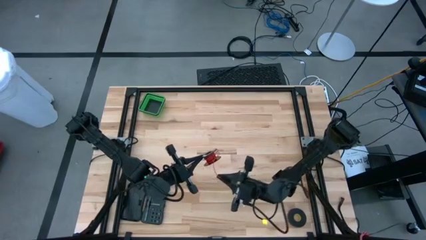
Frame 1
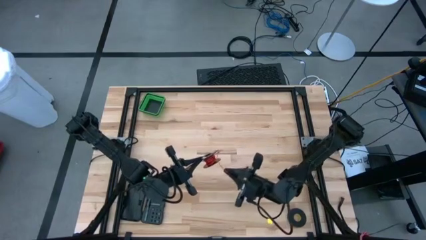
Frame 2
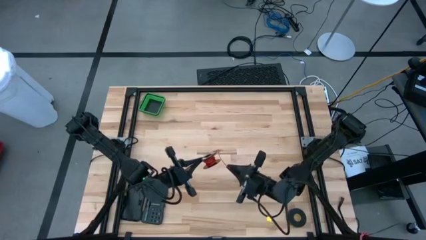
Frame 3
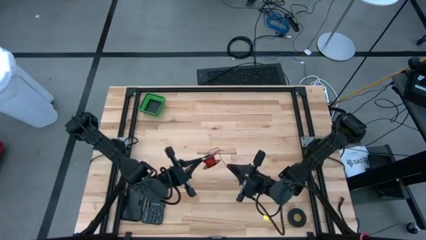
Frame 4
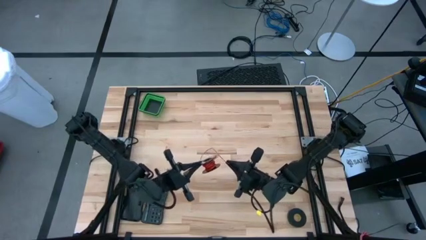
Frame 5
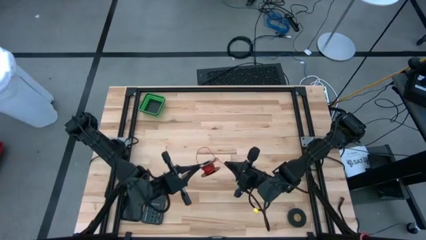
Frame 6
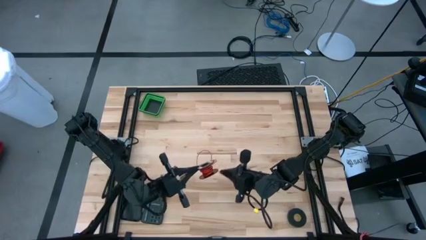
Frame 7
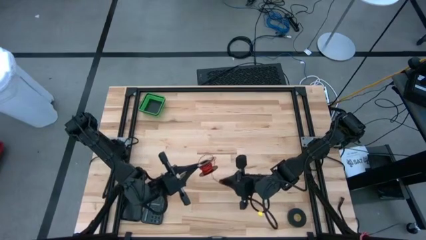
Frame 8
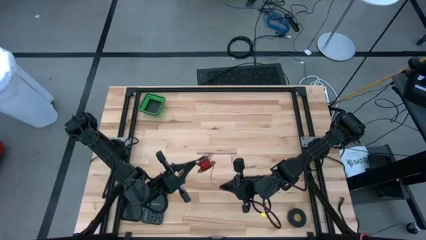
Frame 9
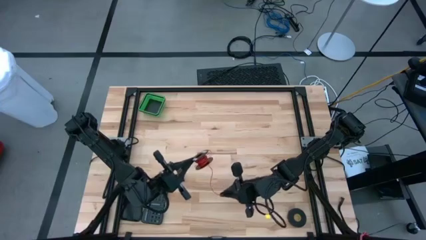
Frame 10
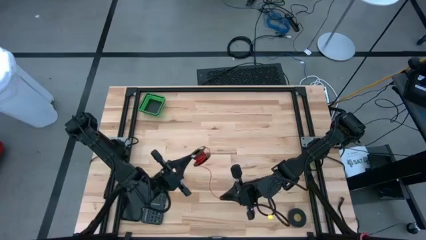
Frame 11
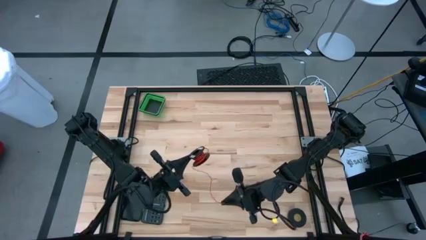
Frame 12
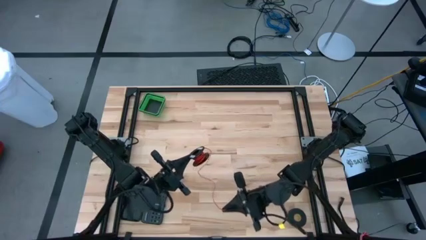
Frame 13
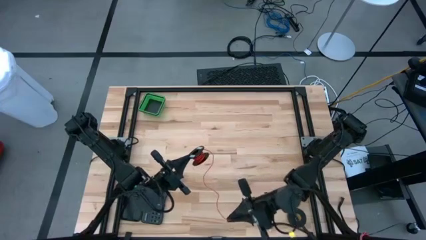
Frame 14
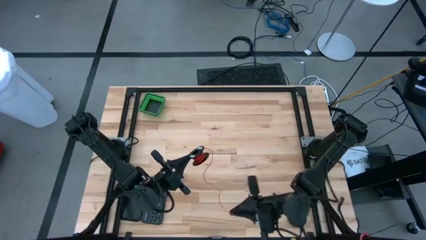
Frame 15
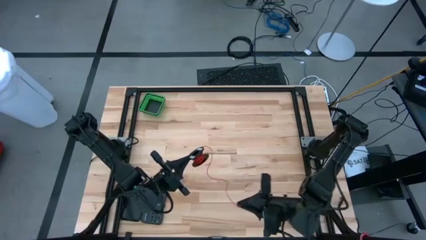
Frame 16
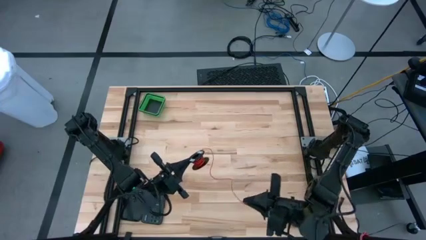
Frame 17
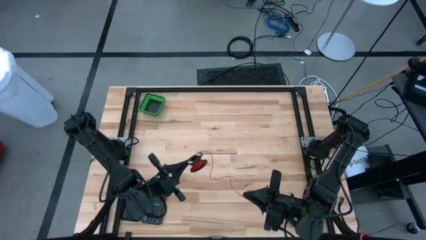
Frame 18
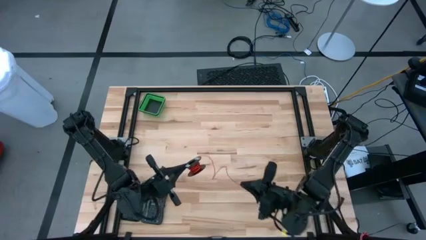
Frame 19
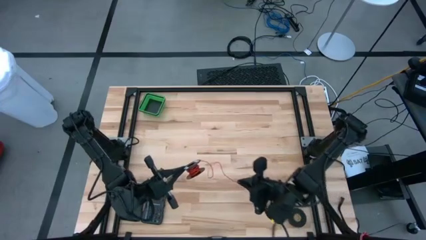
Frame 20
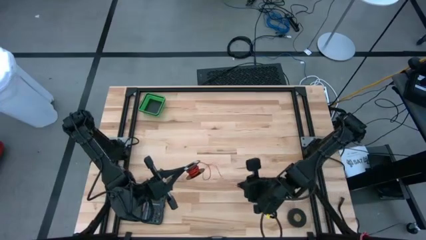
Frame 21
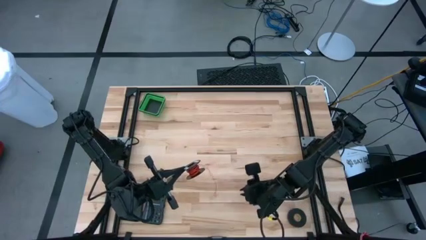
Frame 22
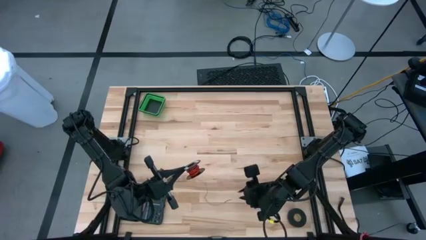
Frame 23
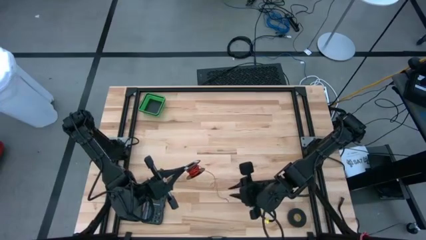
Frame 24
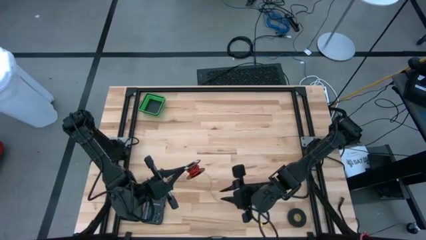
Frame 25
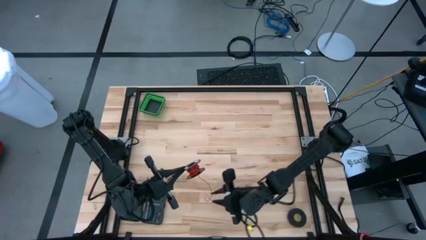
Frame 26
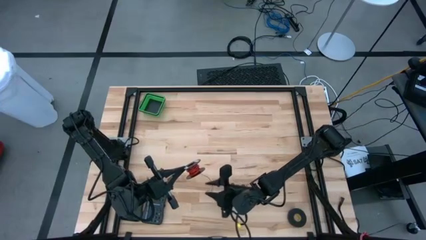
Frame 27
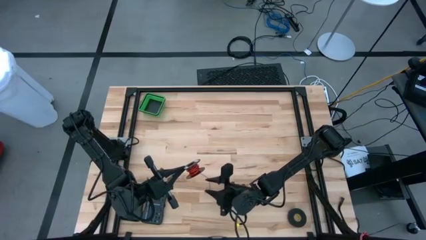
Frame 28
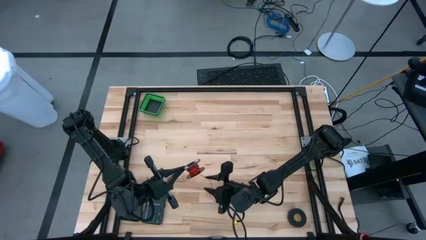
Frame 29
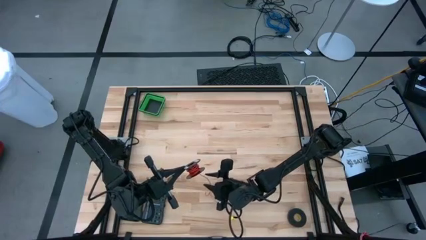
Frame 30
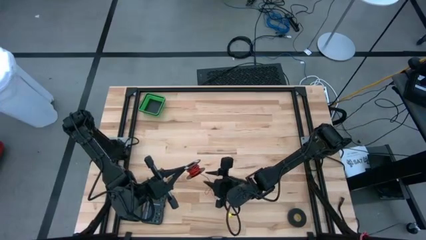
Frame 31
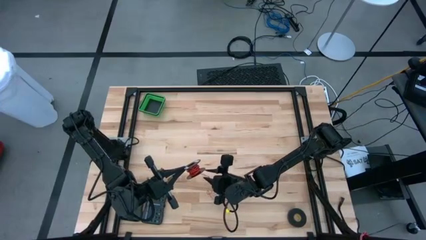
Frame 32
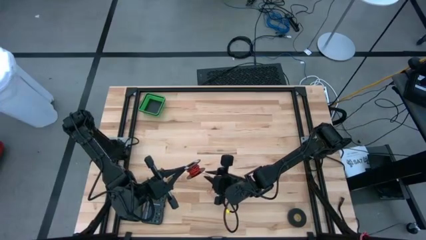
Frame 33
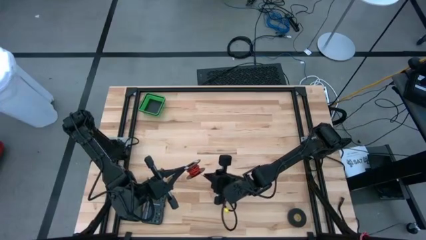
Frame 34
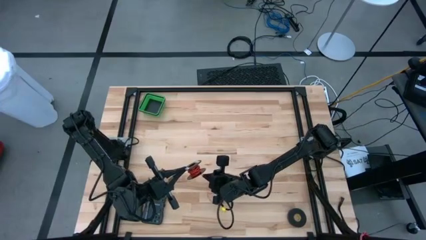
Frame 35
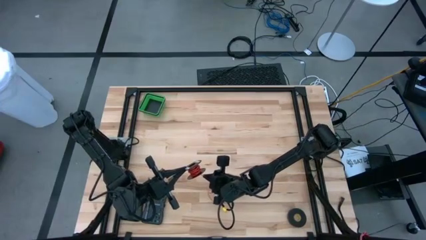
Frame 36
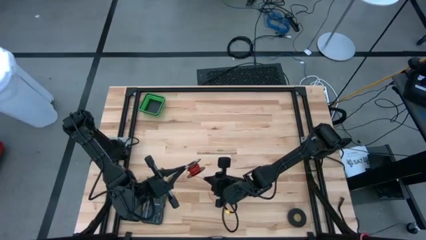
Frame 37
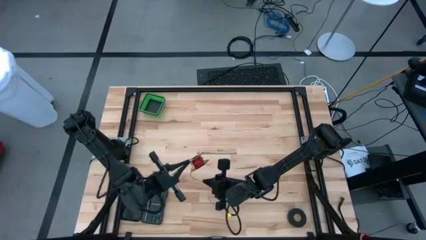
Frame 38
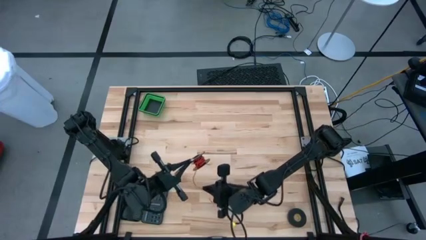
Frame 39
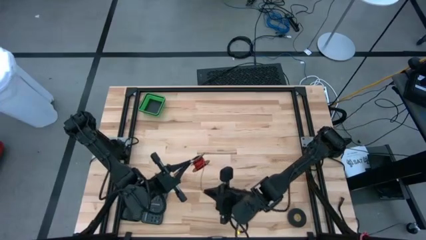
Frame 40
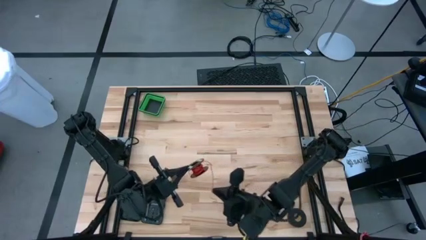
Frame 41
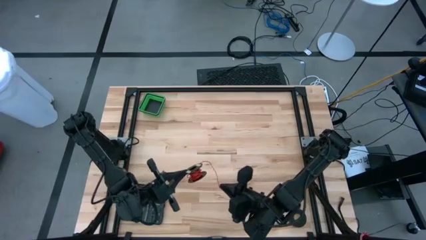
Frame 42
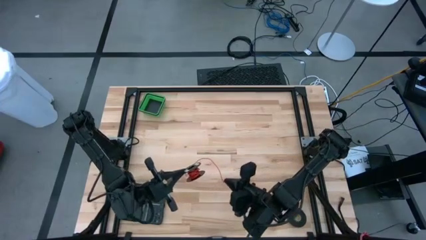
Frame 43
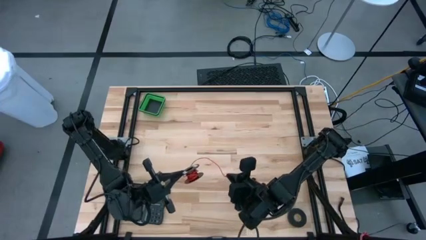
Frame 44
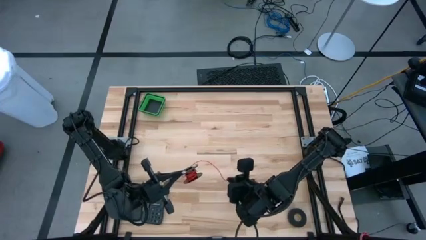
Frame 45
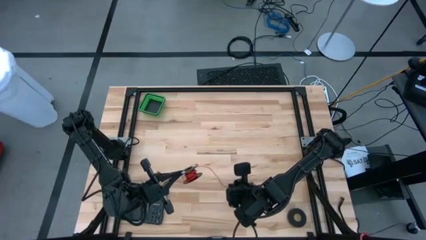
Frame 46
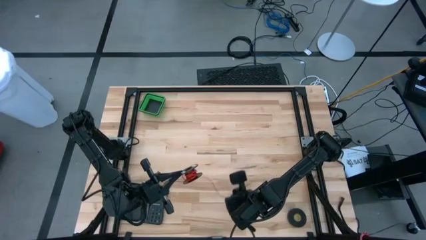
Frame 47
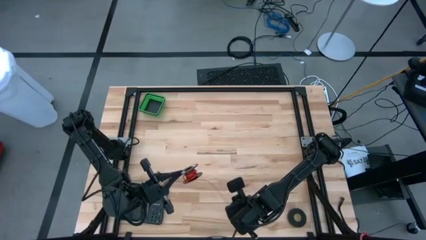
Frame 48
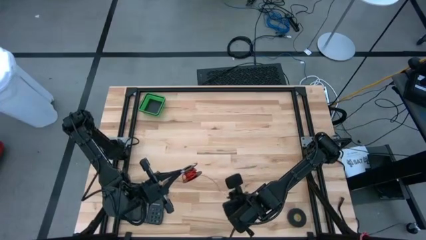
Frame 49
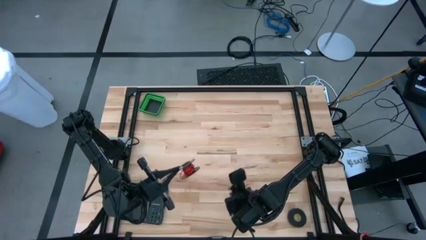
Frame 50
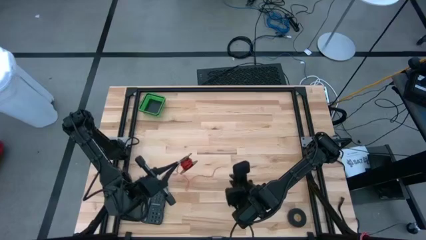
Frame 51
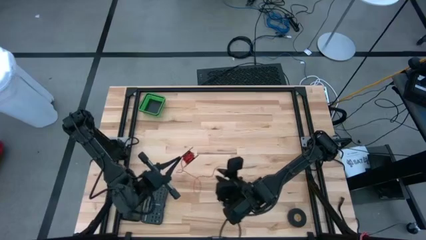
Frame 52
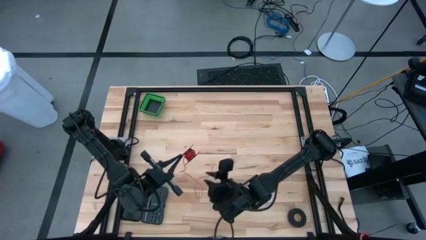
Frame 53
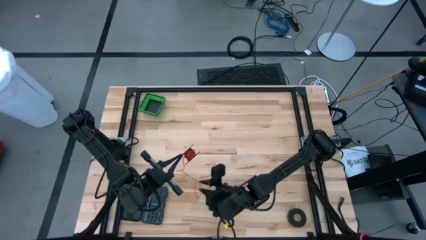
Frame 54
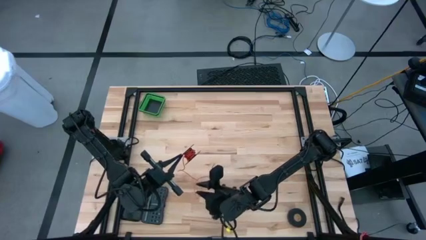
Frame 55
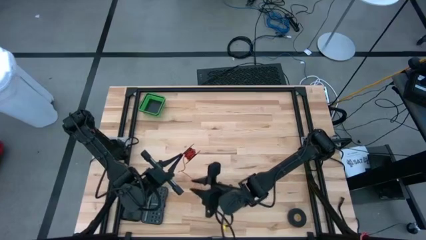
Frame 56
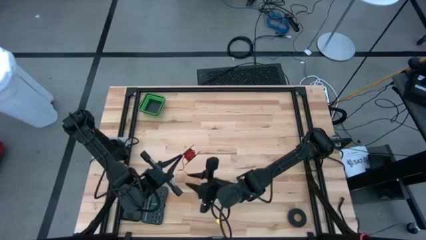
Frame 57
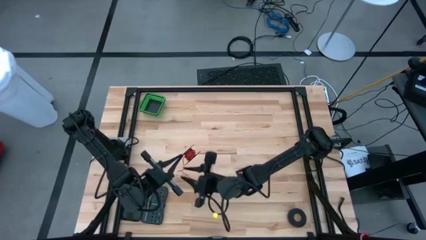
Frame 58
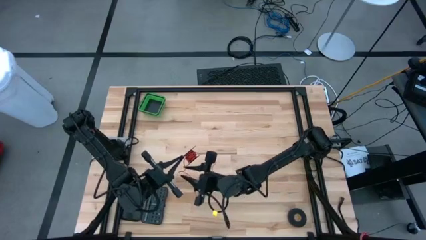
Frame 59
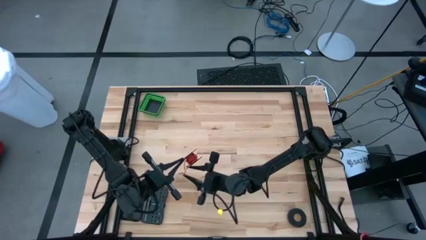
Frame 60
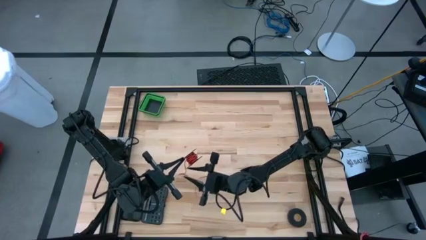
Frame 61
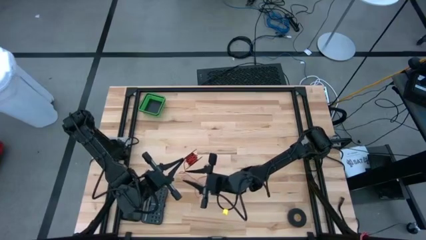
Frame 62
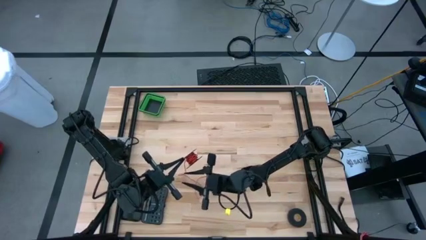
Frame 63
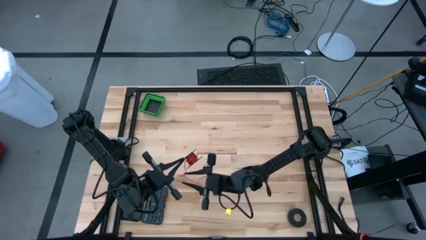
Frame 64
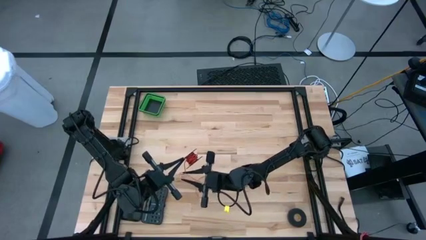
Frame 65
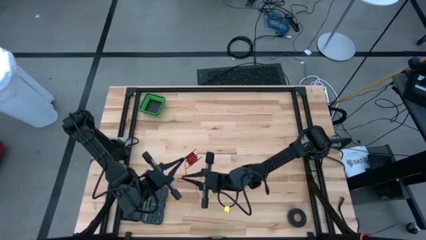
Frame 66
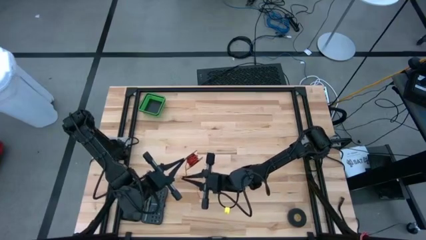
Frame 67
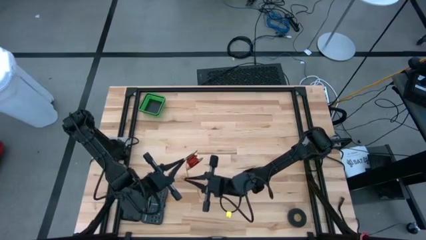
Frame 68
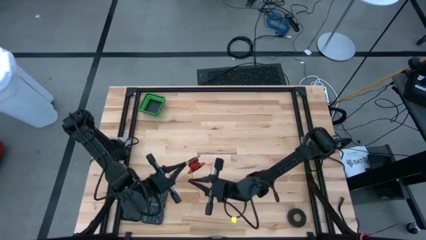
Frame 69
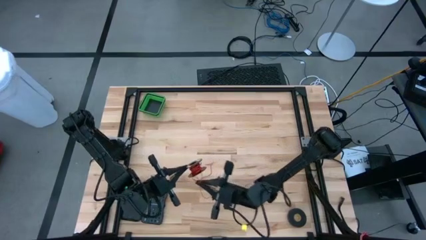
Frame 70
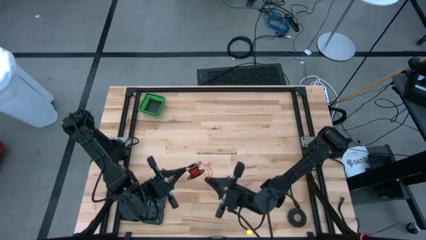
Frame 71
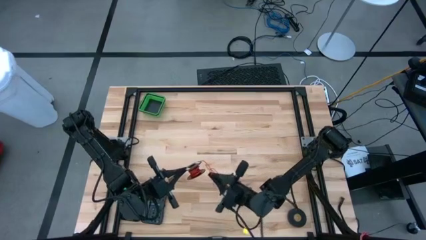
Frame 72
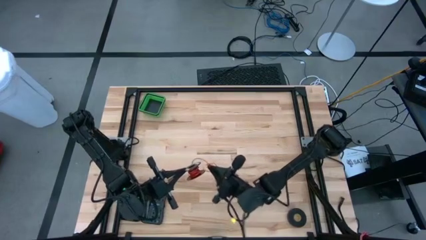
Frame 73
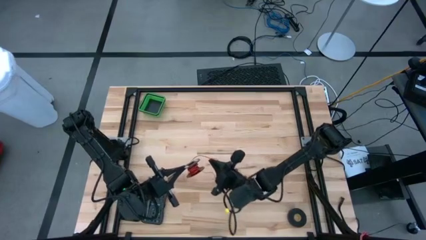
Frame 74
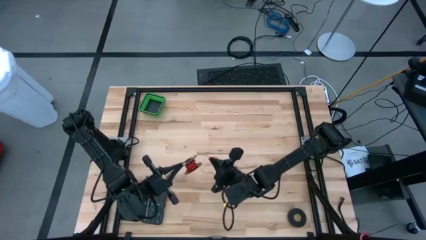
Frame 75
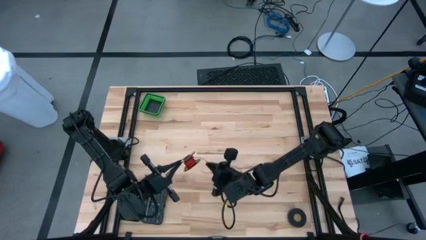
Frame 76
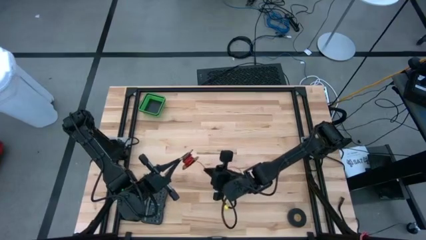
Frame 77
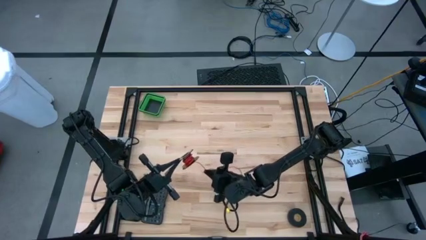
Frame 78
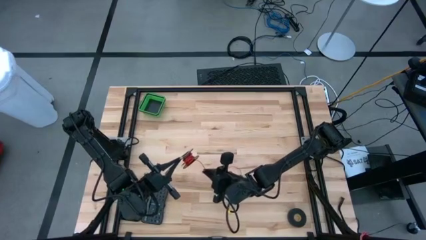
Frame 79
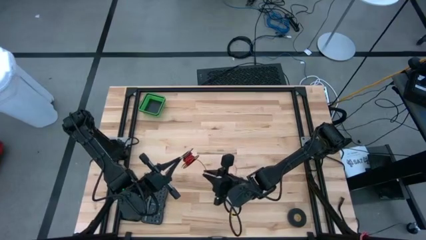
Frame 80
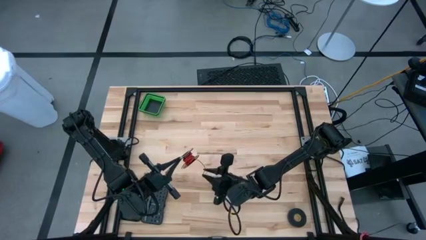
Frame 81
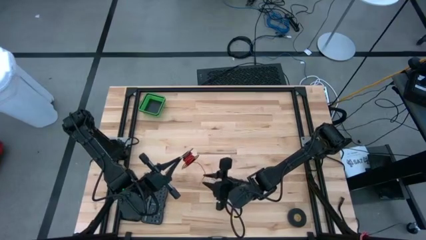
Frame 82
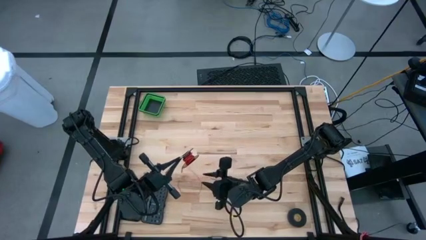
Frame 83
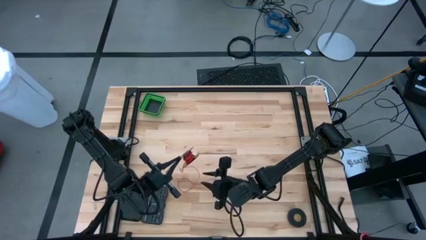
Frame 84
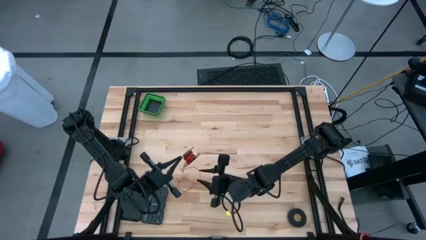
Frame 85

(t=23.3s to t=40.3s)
Task: Coil cords
Uncoil the red wire from the spool
